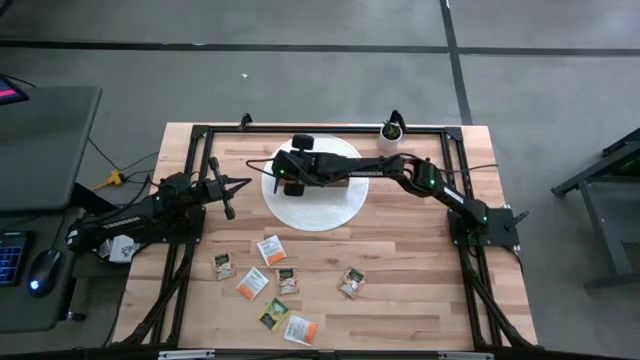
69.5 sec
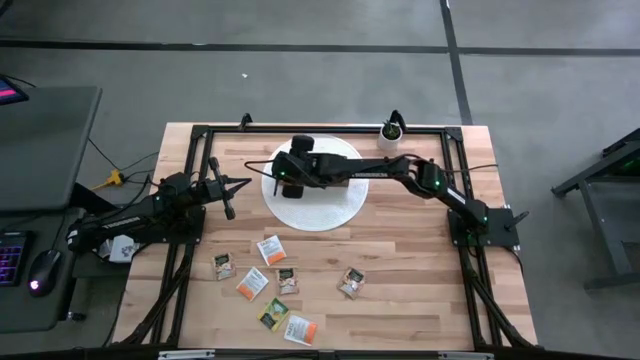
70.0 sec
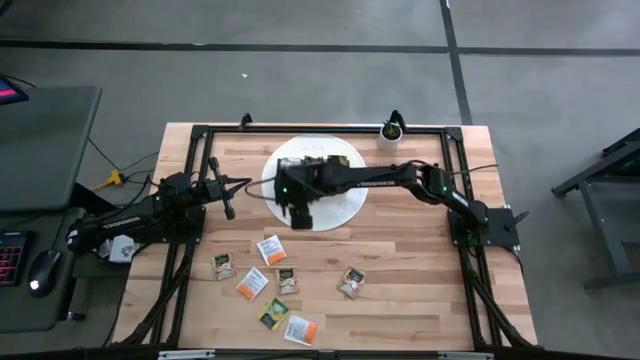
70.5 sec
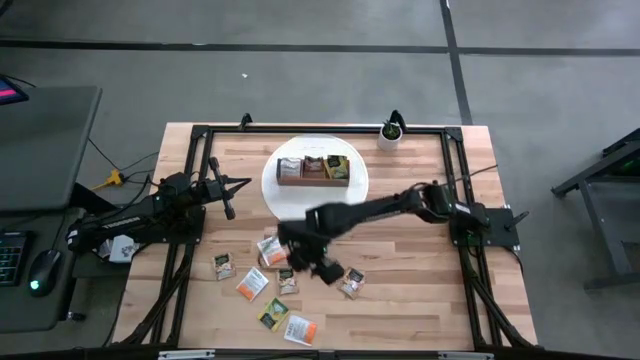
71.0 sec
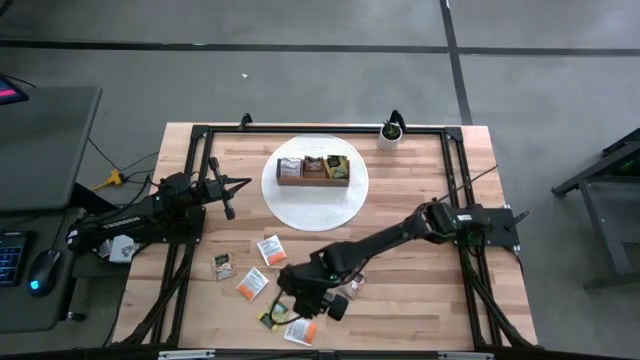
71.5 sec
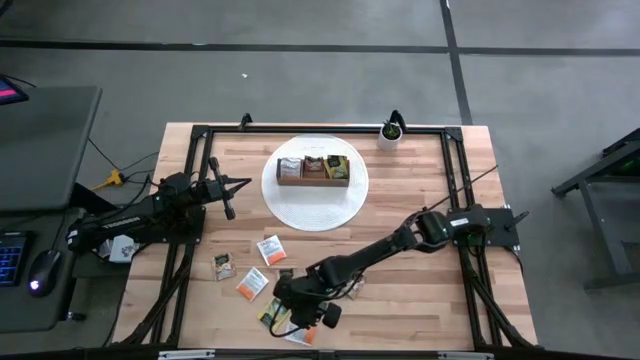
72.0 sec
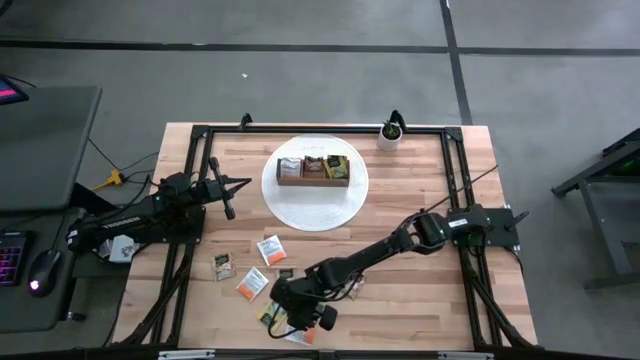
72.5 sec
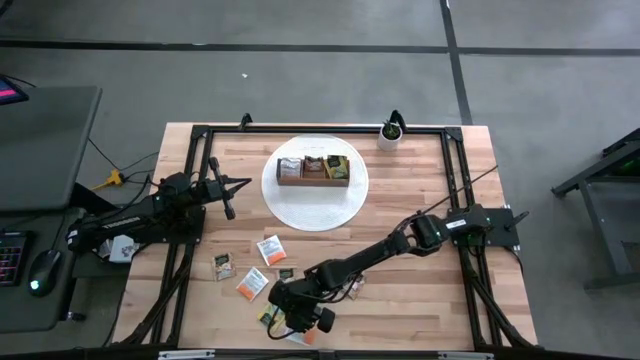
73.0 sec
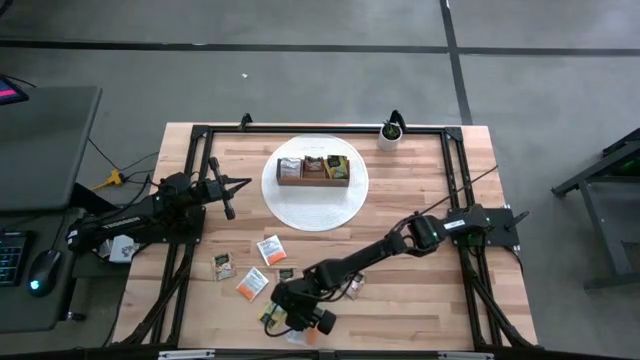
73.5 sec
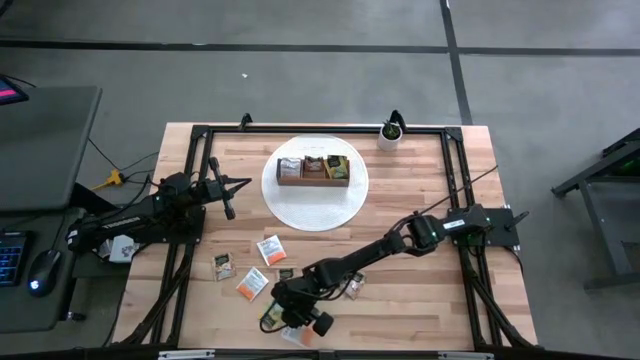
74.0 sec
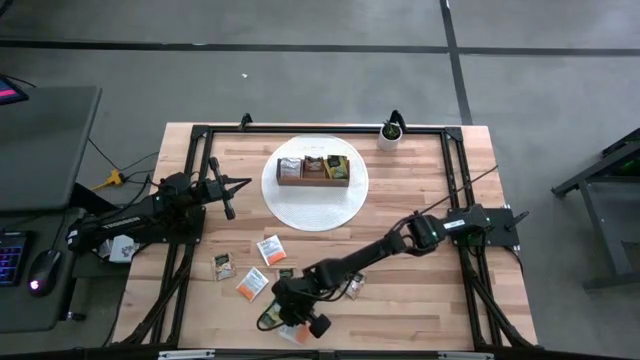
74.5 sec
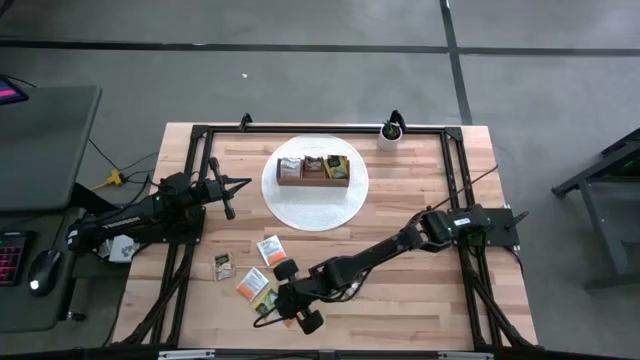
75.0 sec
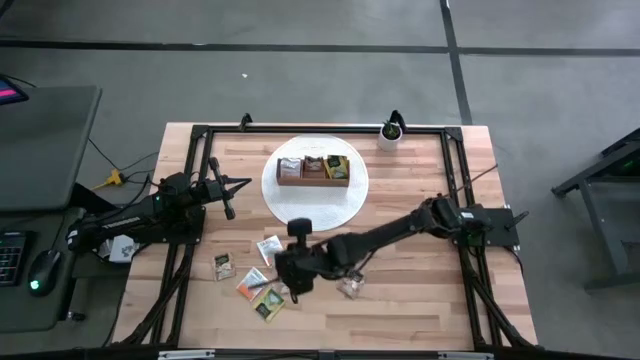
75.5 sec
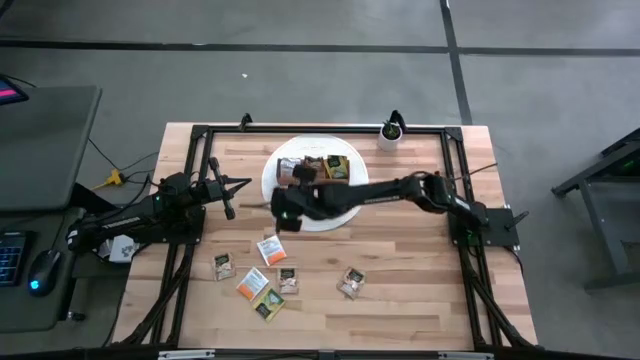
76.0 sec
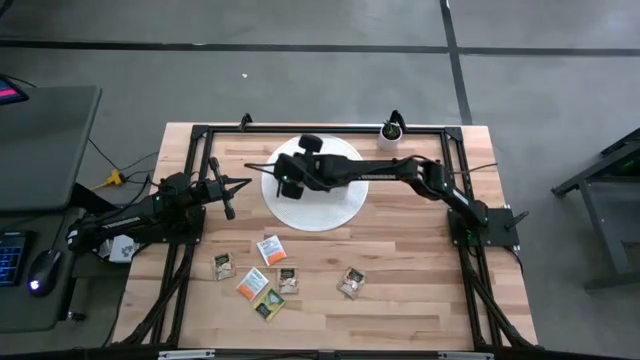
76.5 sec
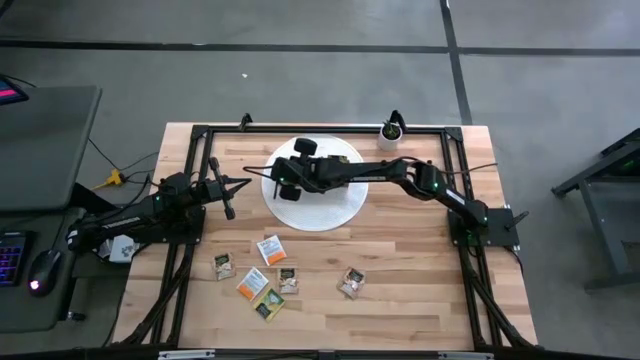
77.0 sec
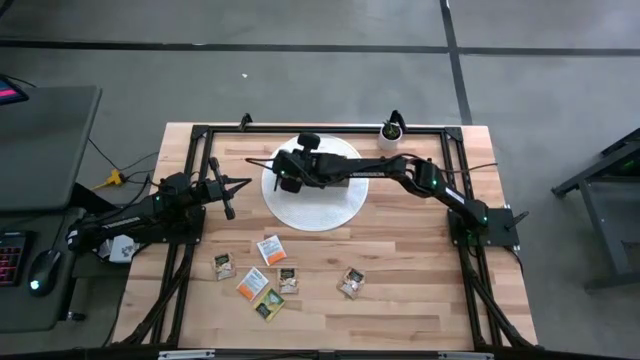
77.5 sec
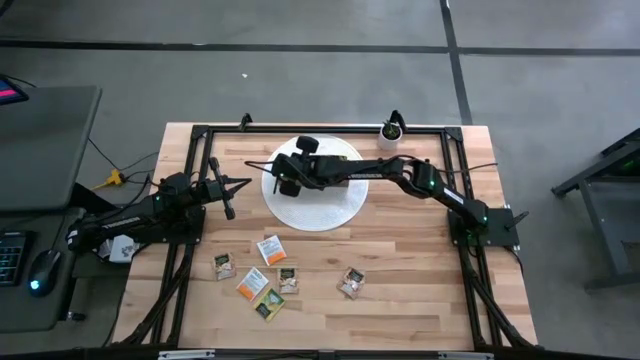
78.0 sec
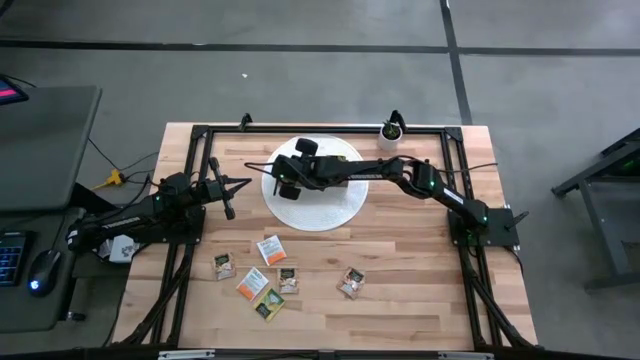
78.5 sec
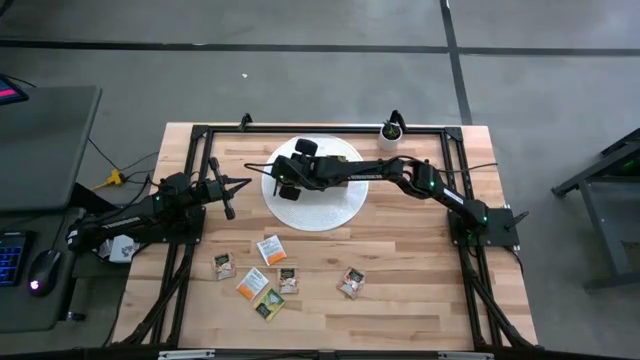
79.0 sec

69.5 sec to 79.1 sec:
Task: Pick & Place Tea
Put the white tea bag into the left section of the wooden organizer

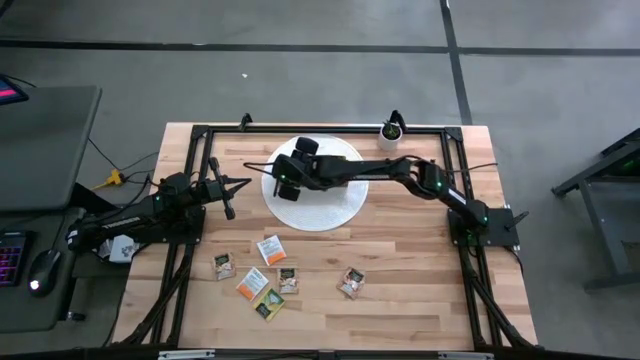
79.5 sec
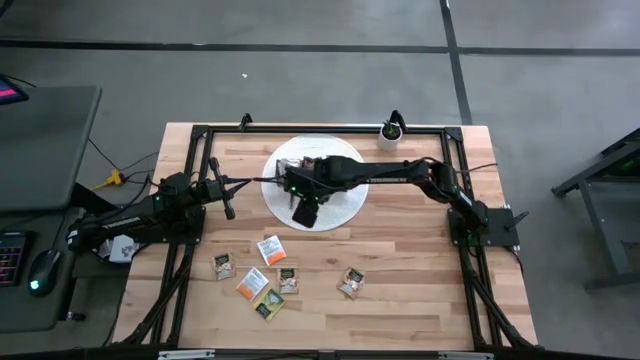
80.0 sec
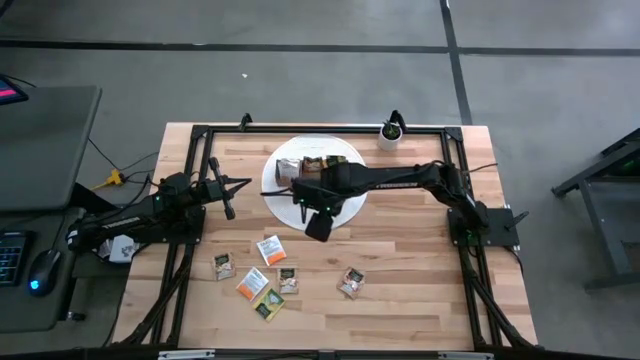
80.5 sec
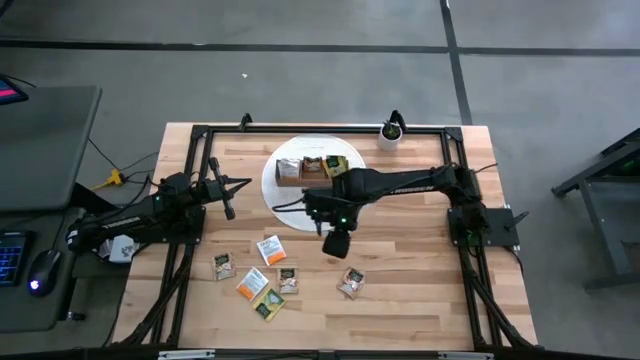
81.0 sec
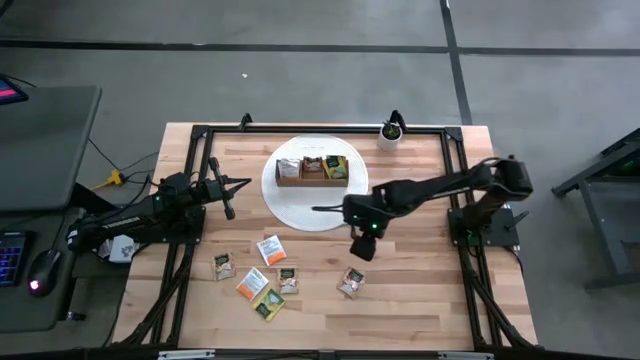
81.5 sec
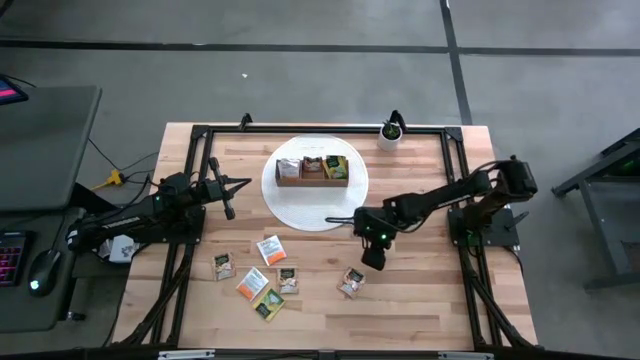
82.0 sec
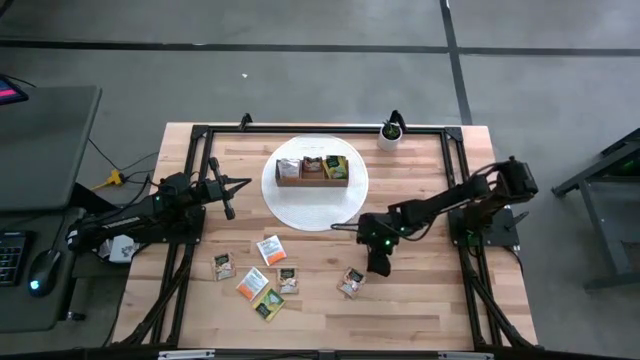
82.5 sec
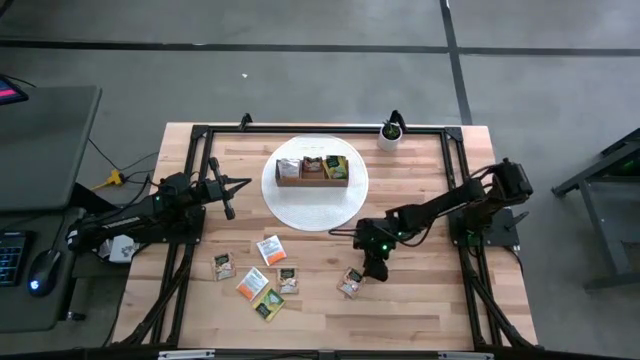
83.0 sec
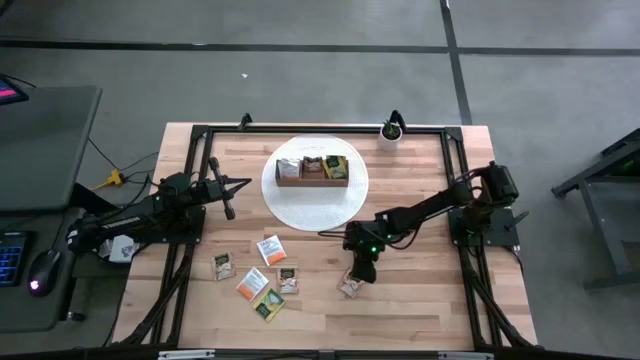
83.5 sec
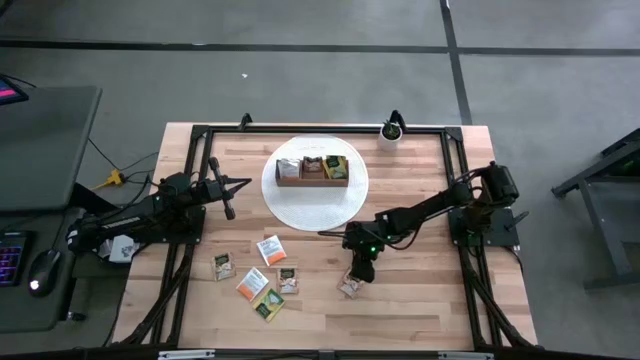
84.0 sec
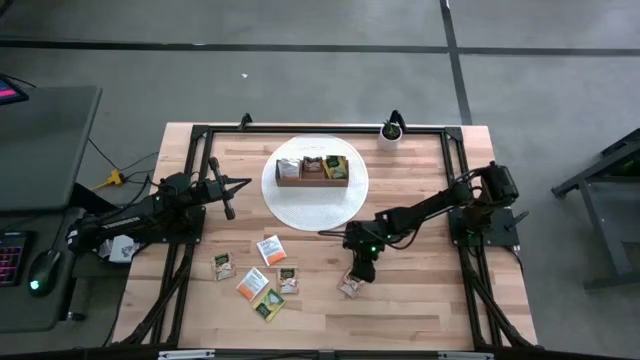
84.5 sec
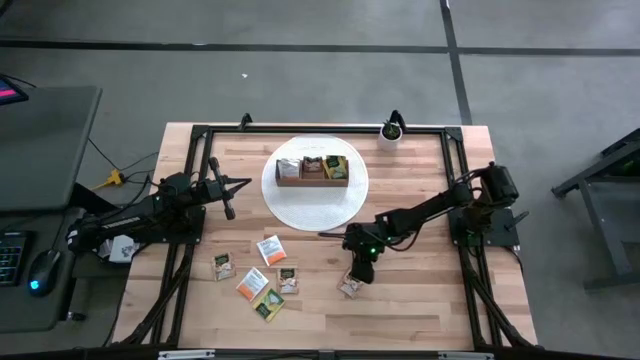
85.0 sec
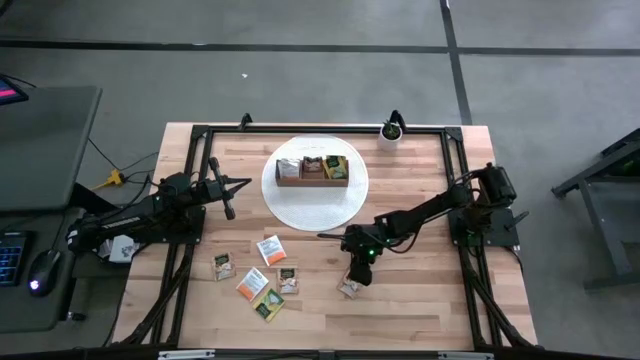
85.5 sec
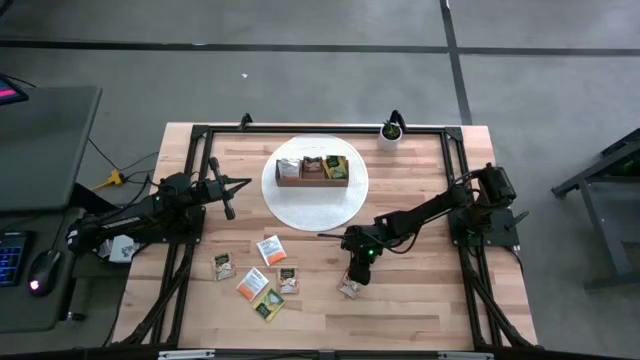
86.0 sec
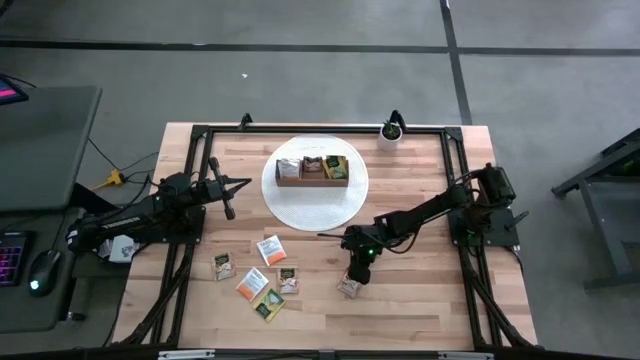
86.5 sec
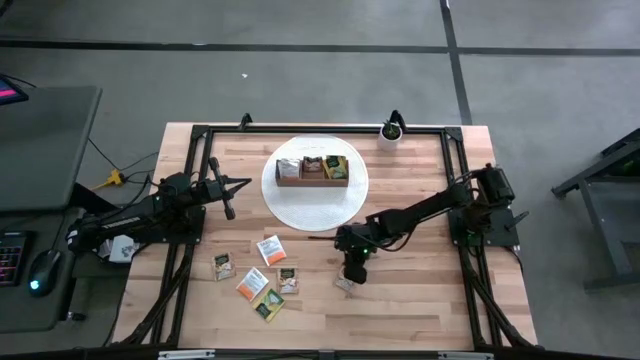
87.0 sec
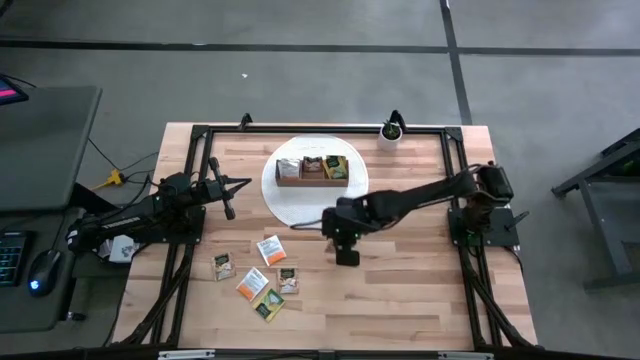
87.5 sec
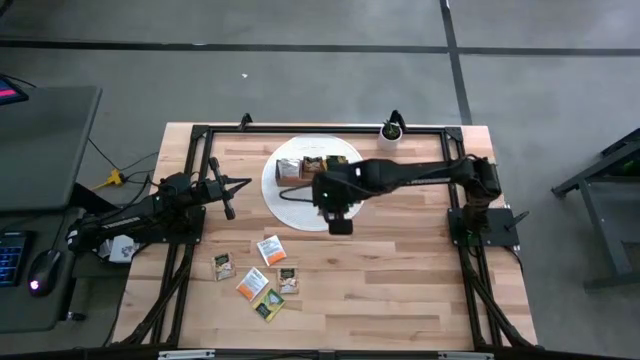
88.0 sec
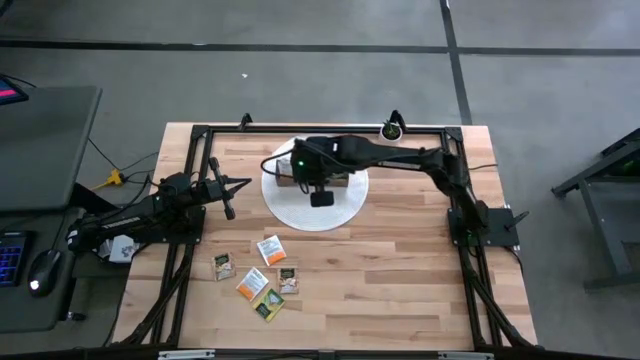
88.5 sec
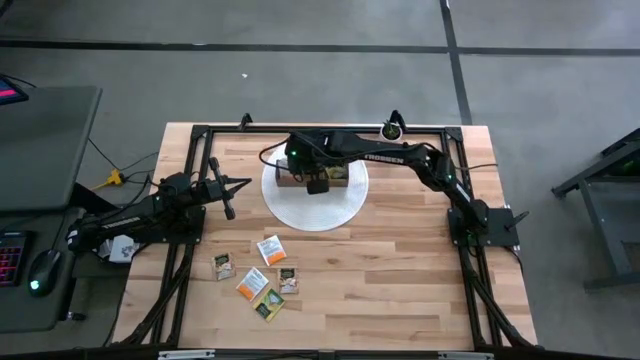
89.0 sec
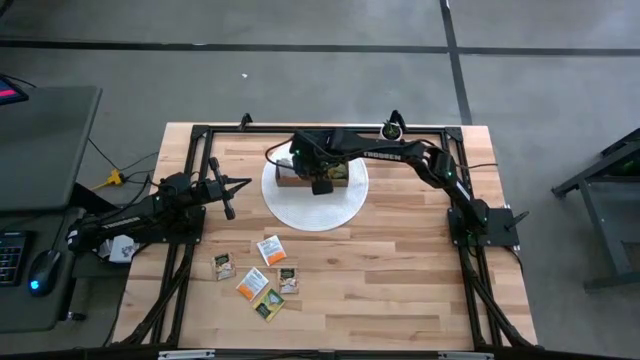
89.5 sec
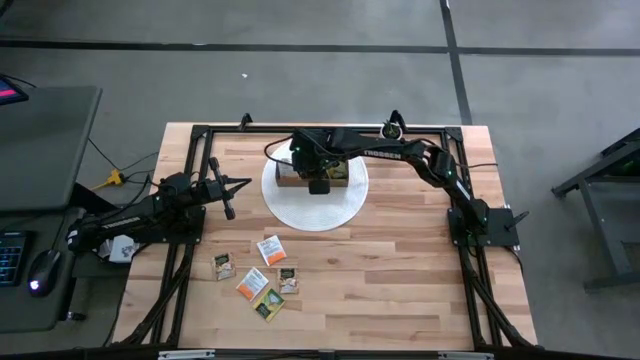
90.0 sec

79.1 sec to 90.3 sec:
Put the brown tea bag into the middle section of the wooden organizer
